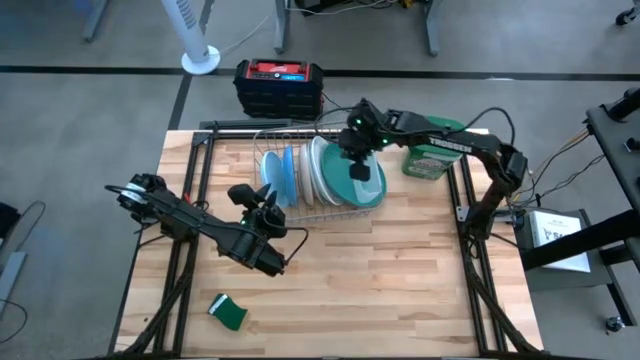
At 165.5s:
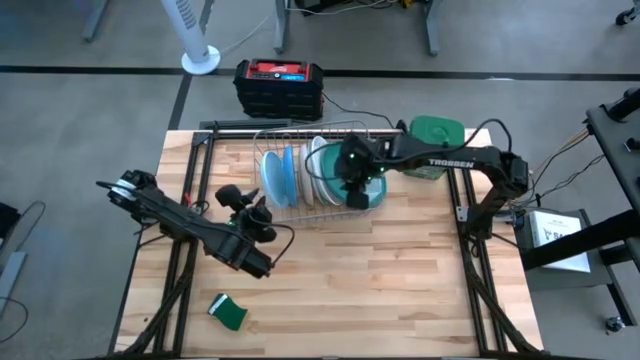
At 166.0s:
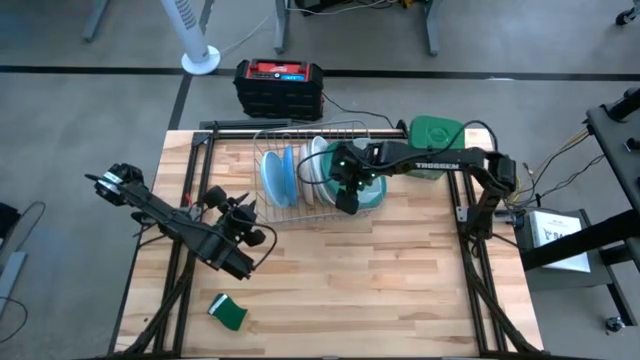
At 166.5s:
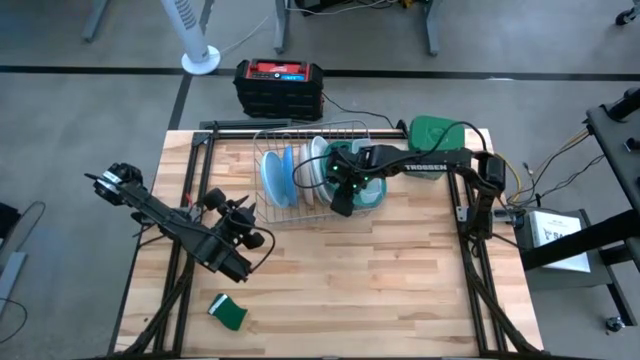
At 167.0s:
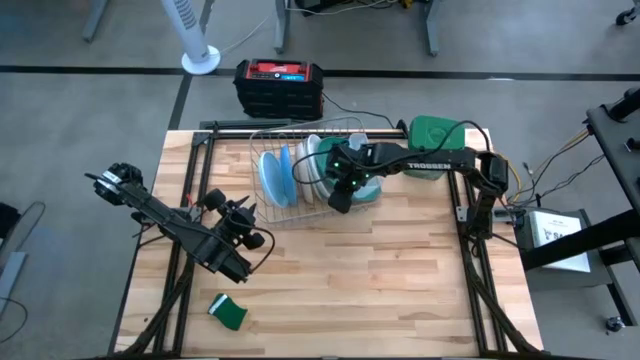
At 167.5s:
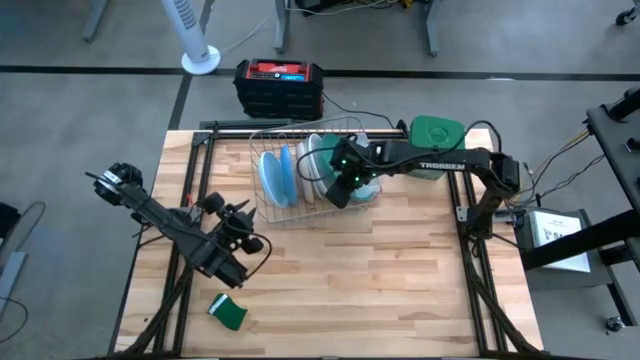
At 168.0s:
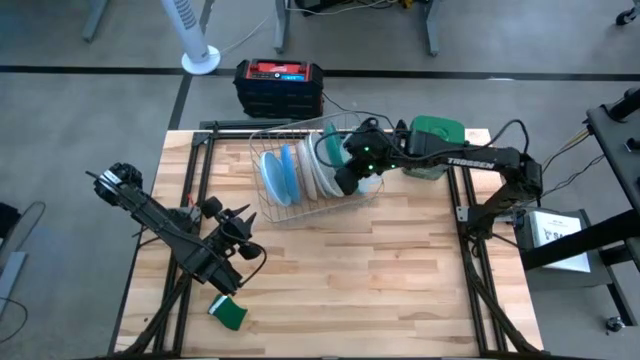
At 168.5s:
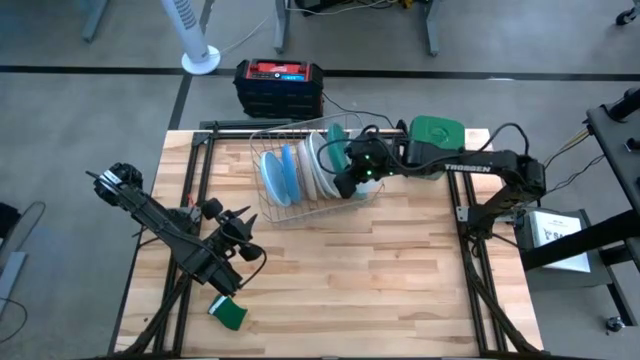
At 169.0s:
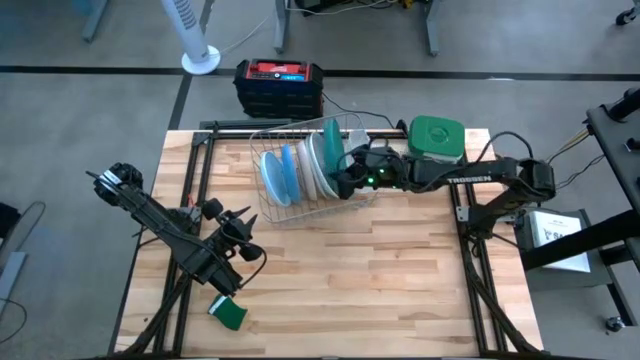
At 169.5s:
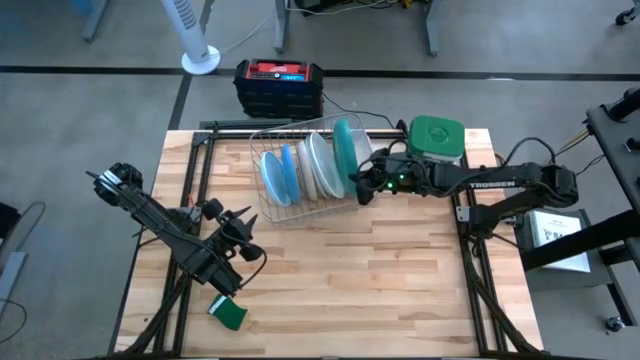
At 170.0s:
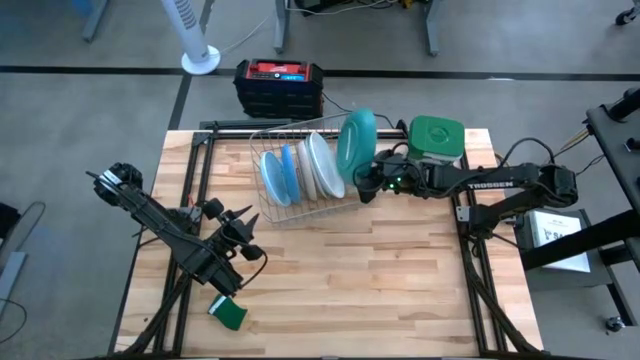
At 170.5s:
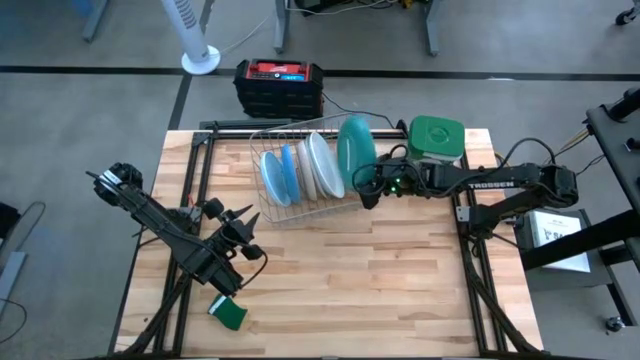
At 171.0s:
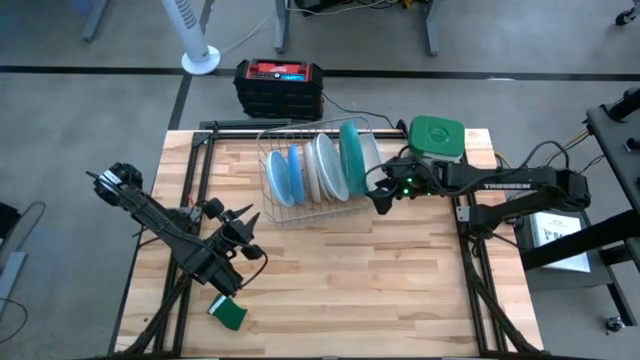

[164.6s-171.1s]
Task: Sort dishes
Put the green plate in the dish rack

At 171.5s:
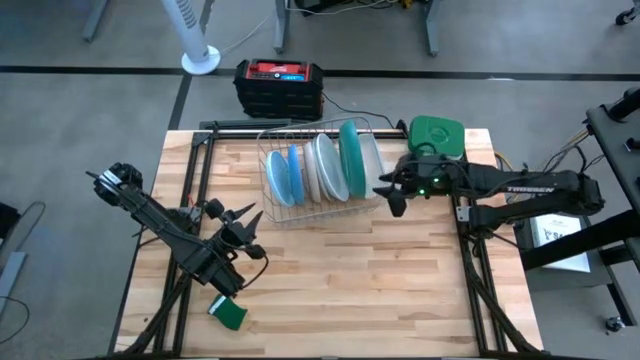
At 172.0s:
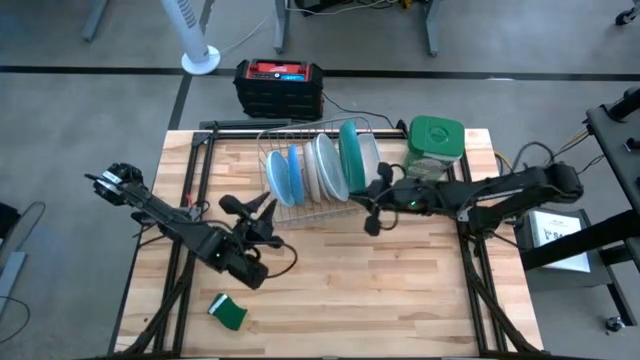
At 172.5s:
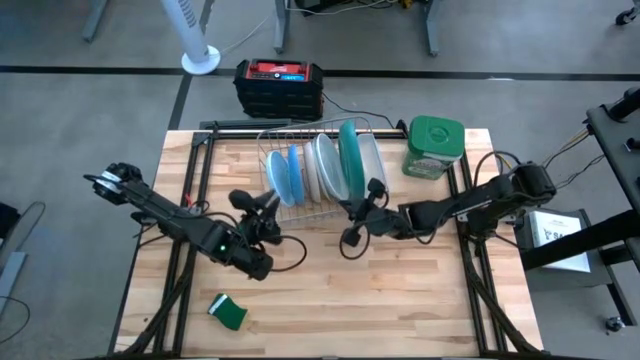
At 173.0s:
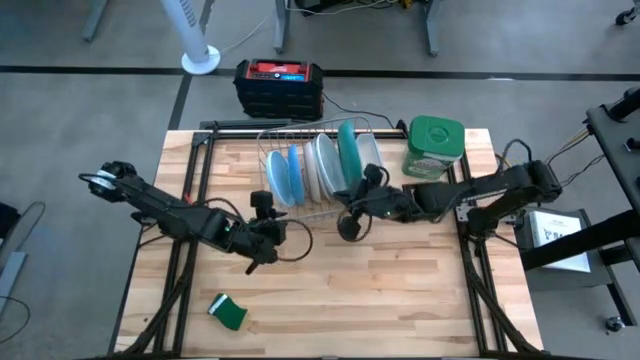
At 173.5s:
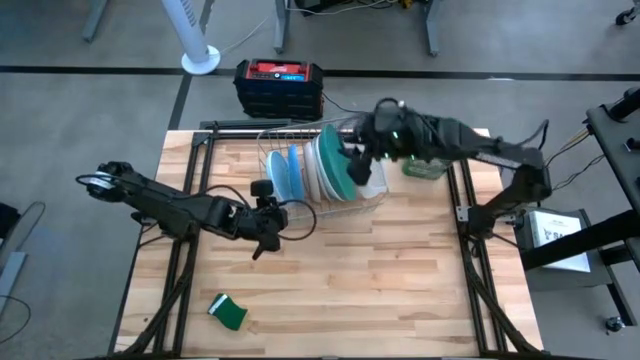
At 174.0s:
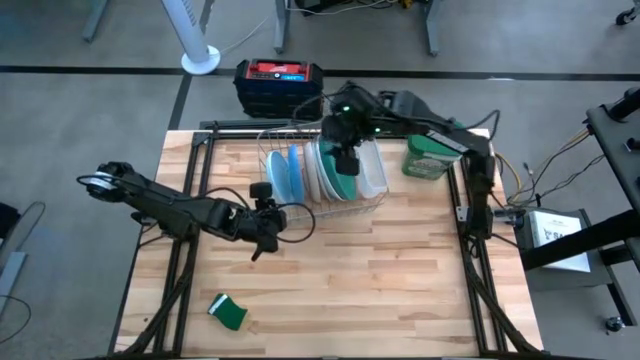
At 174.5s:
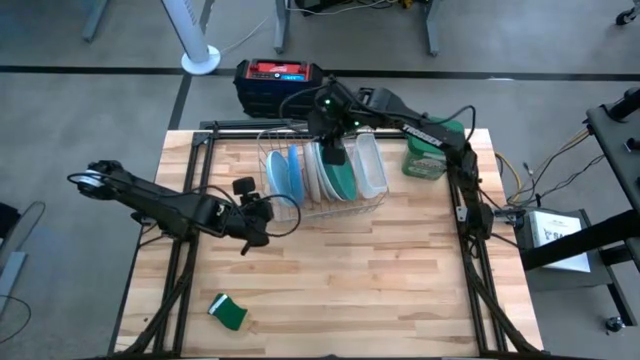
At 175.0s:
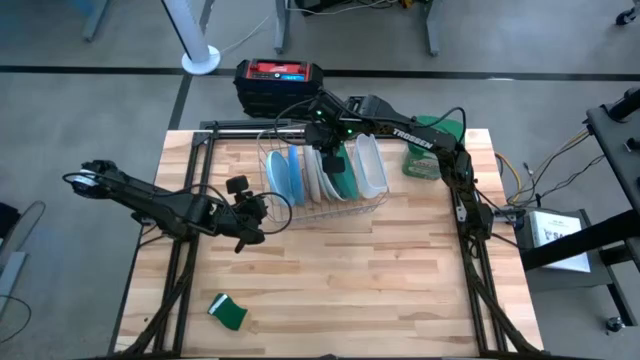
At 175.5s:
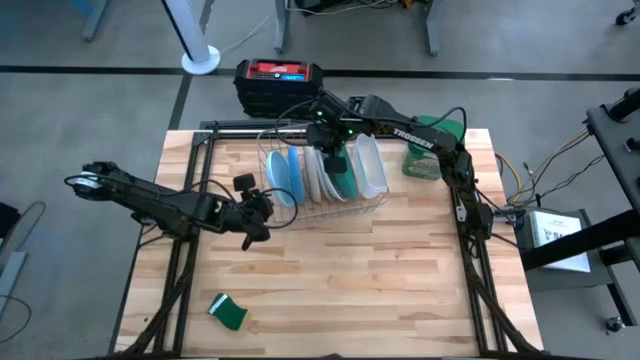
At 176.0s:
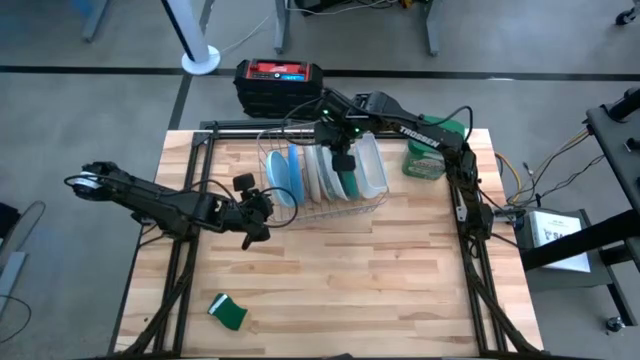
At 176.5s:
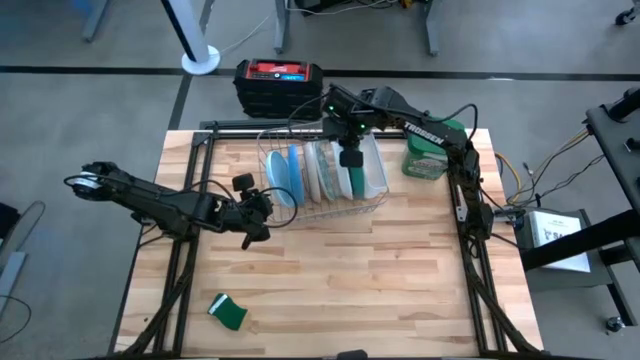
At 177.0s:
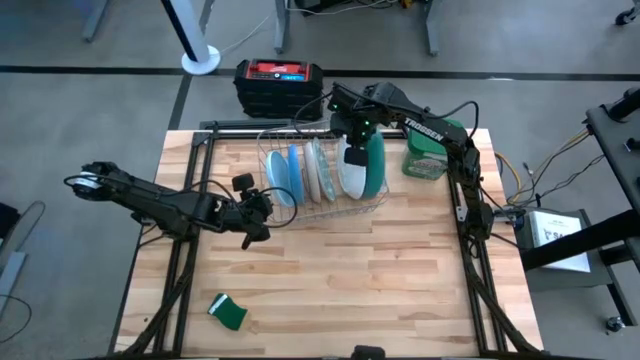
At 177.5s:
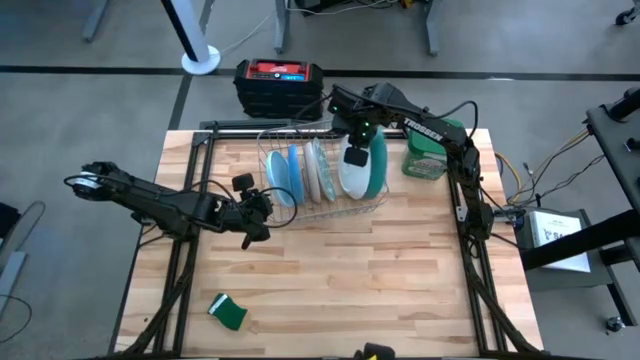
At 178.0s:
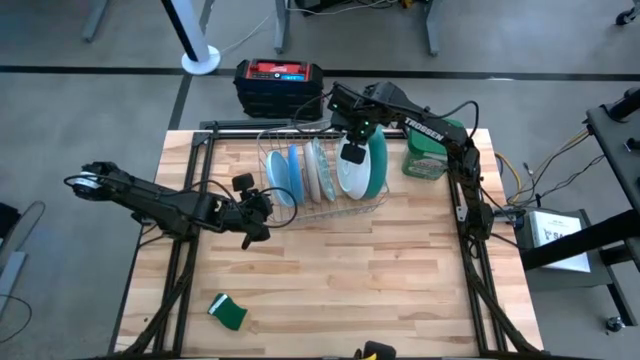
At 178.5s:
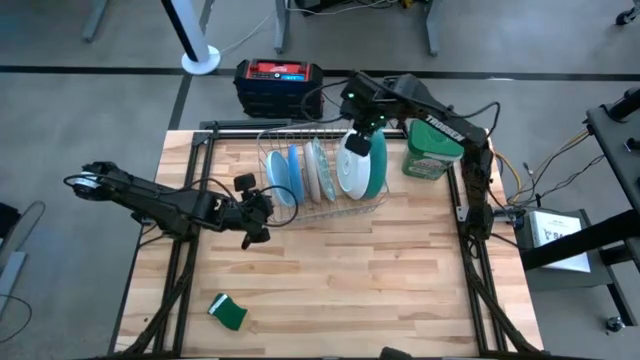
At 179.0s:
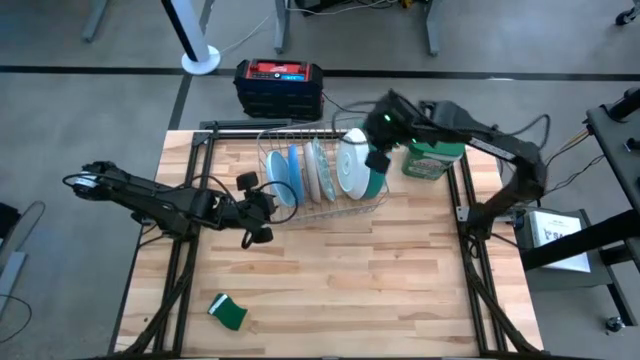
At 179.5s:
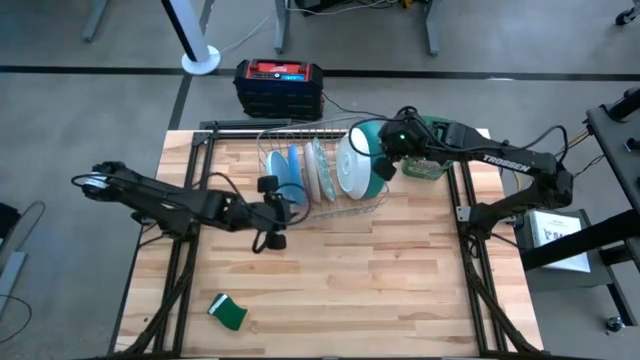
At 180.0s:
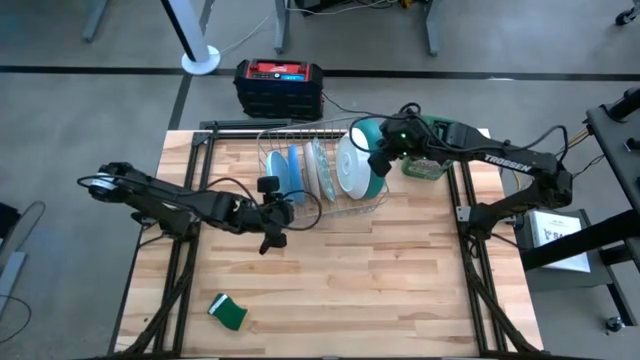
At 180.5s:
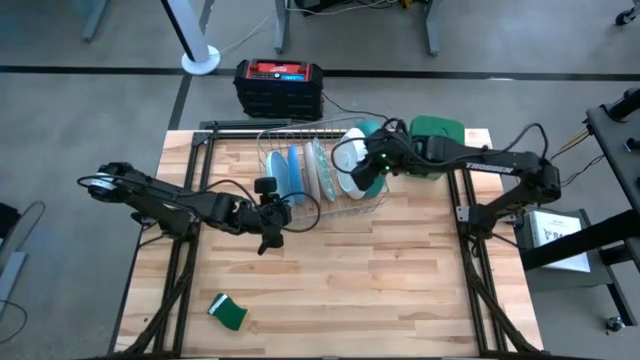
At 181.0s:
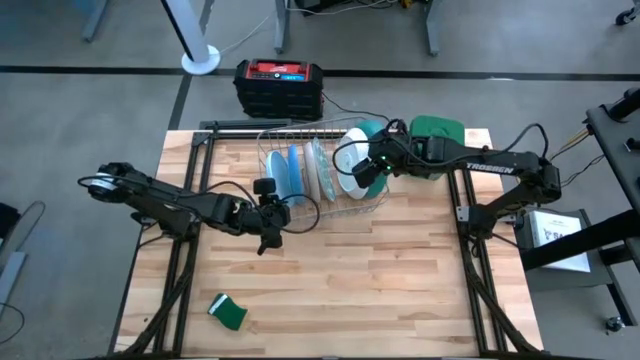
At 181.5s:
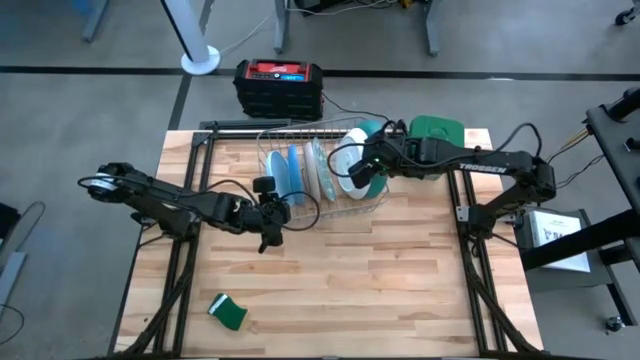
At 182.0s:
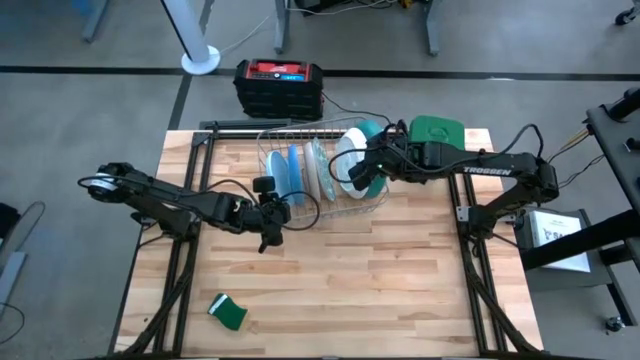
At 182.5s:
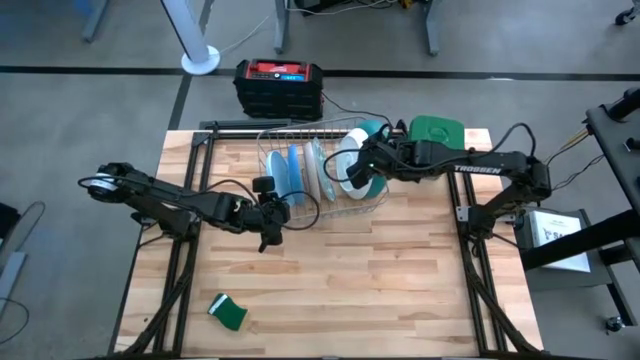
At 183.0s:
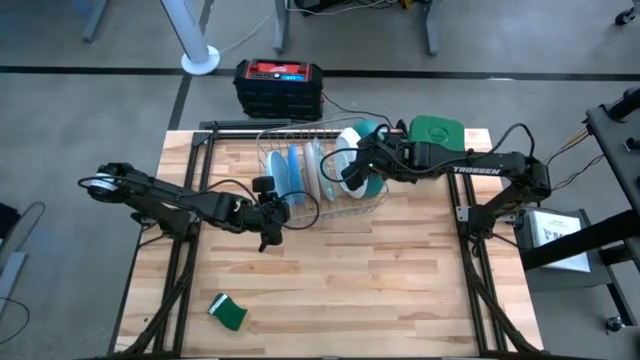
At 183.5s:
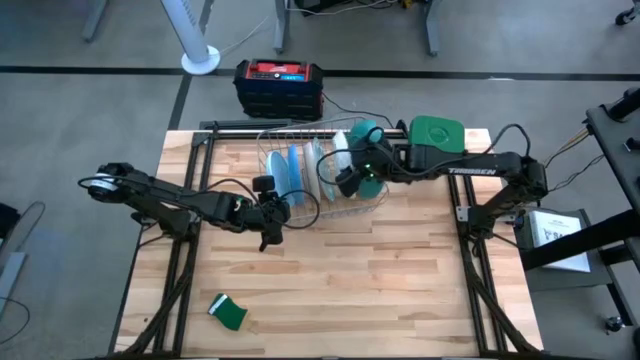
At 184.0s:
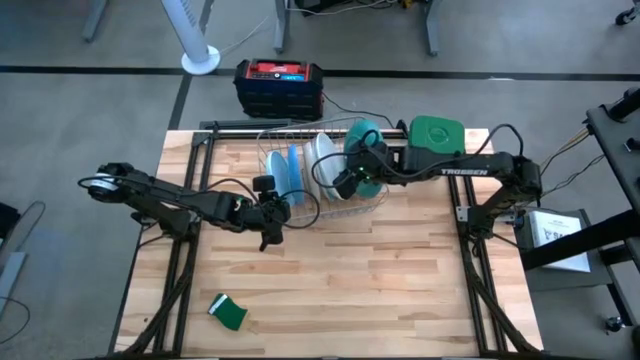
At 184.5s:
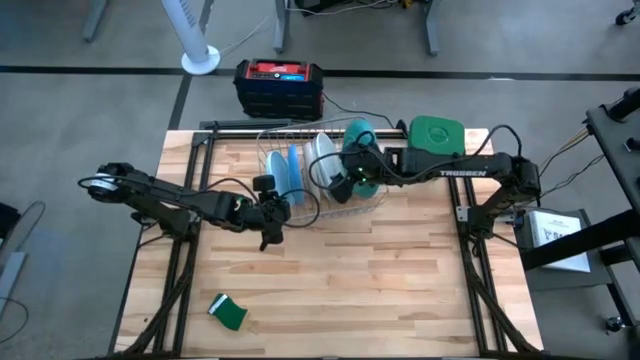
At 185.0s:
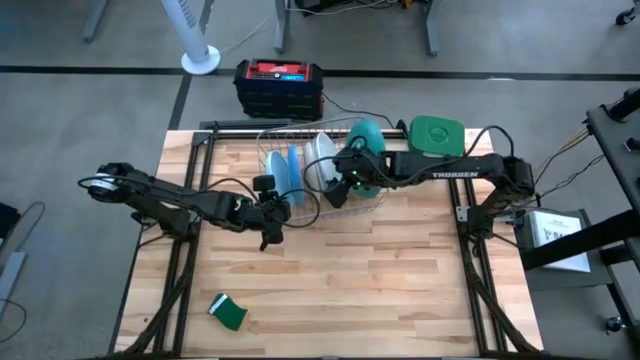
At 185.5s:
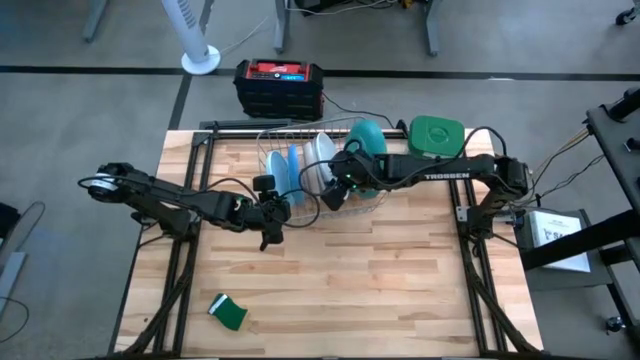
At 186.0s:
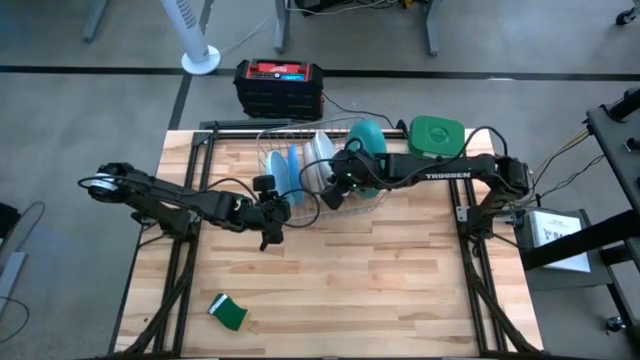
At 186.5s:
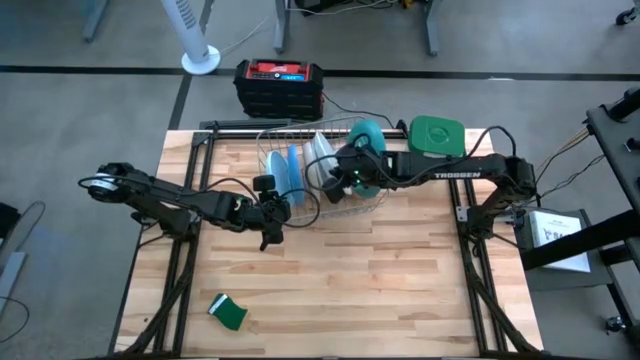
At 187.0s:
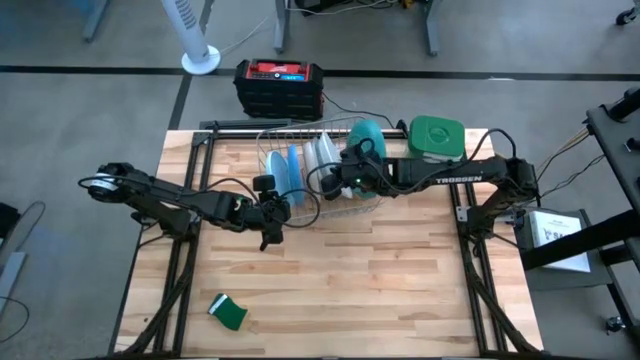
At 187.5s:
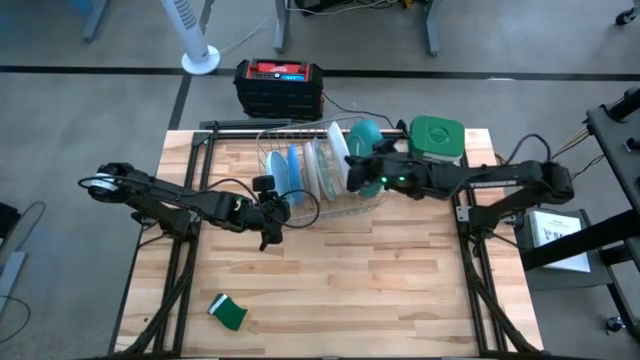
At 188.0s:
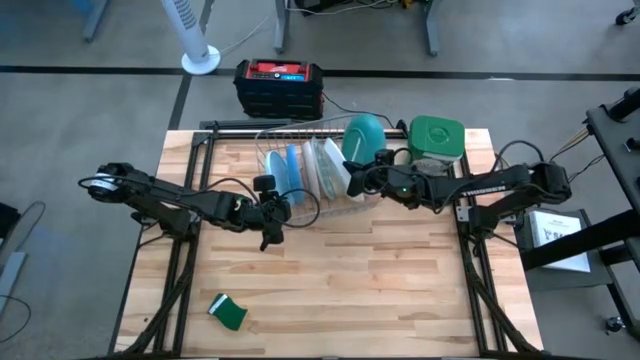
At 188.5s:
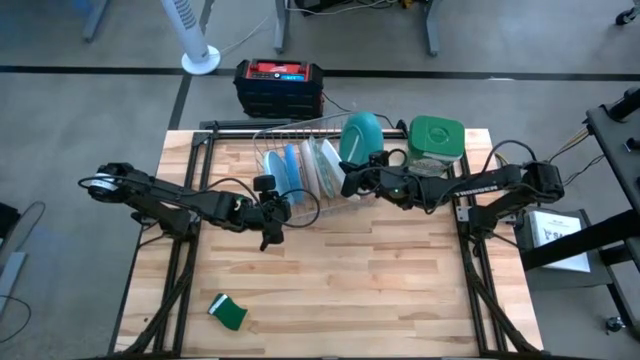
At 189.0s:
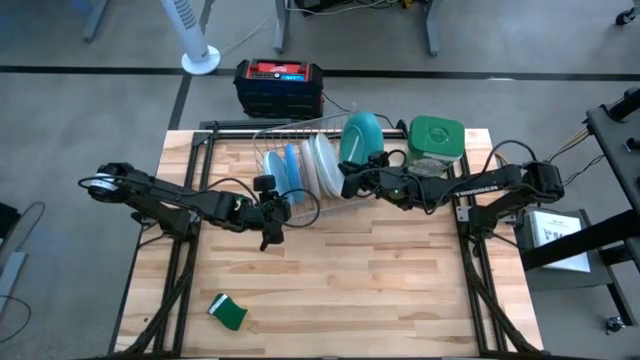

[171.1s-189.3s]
Adjust the plates on the dish rack
